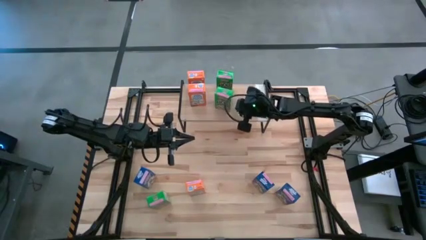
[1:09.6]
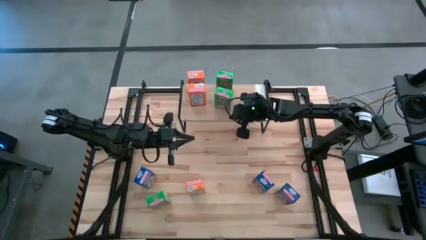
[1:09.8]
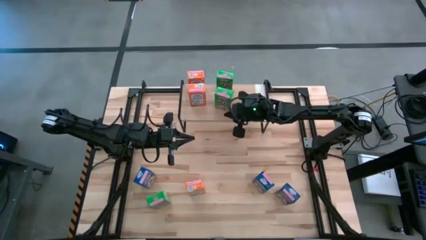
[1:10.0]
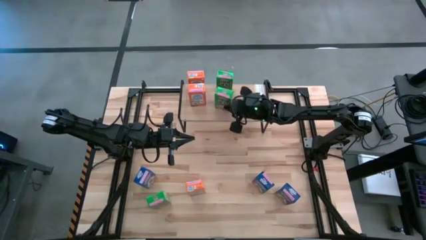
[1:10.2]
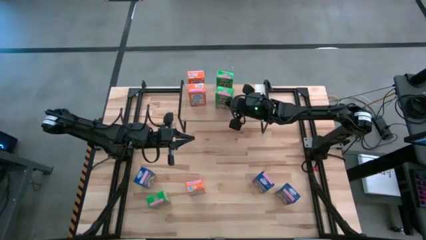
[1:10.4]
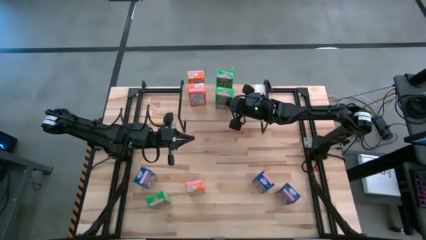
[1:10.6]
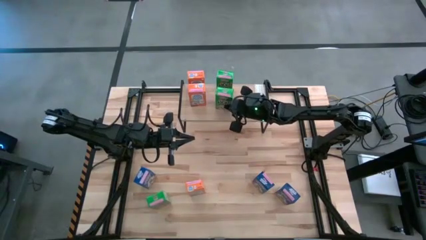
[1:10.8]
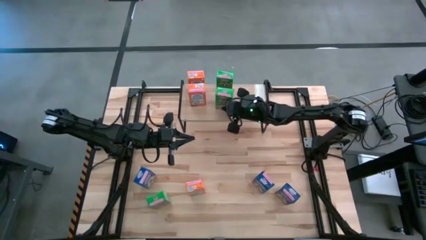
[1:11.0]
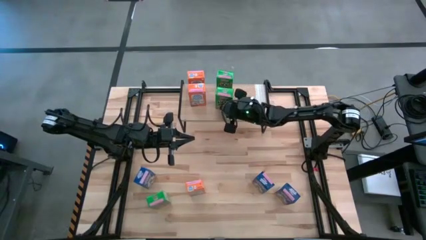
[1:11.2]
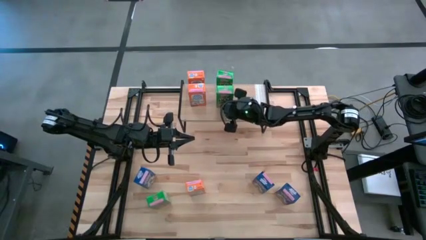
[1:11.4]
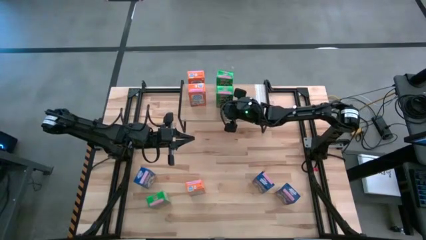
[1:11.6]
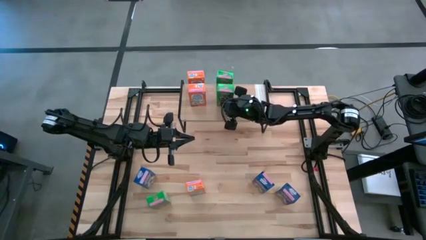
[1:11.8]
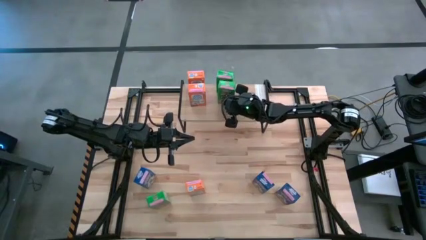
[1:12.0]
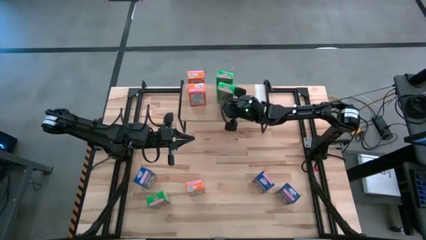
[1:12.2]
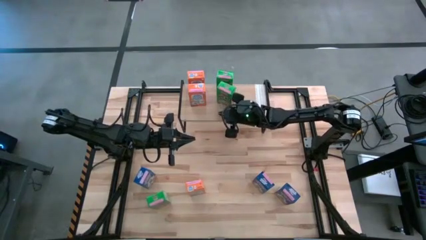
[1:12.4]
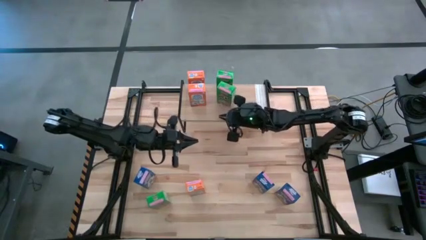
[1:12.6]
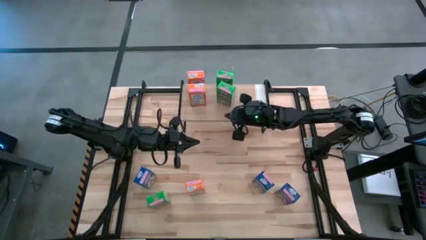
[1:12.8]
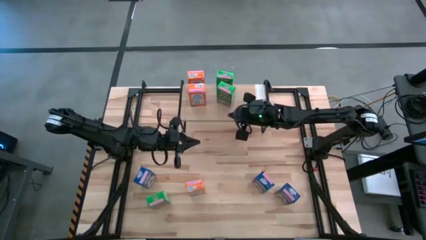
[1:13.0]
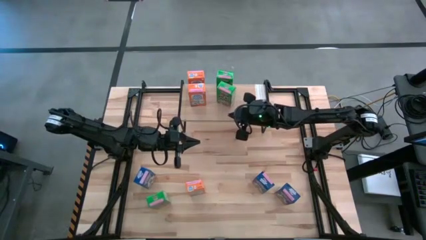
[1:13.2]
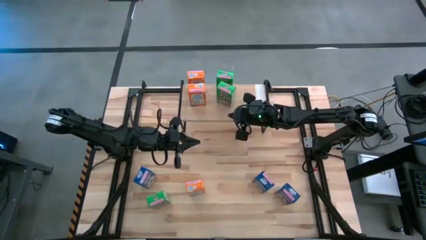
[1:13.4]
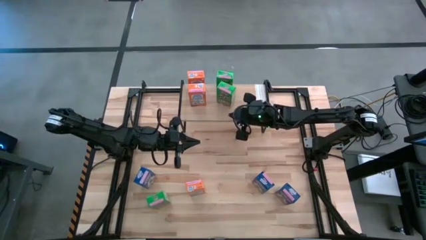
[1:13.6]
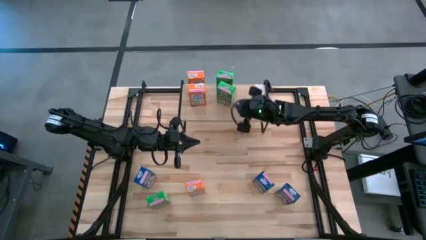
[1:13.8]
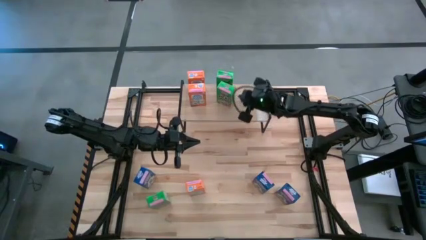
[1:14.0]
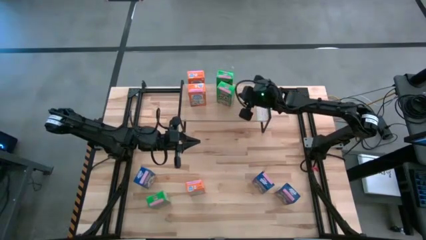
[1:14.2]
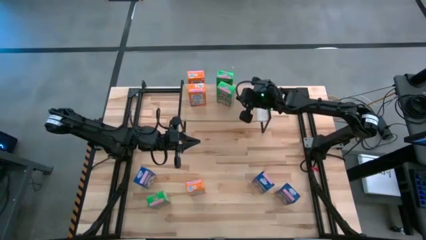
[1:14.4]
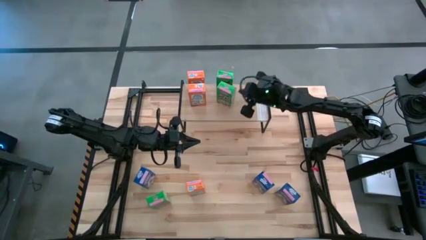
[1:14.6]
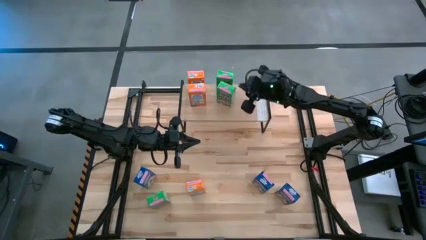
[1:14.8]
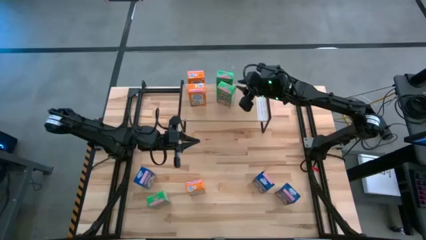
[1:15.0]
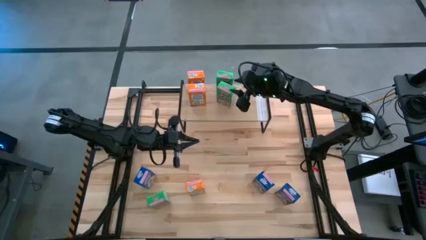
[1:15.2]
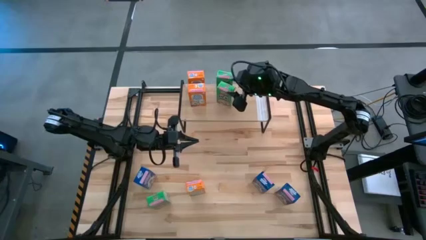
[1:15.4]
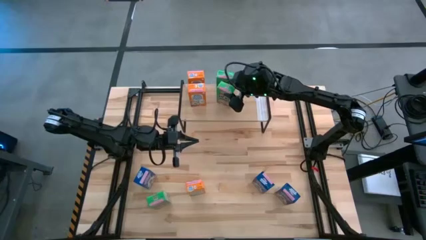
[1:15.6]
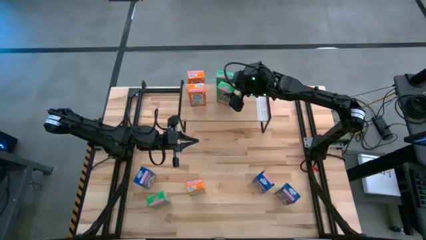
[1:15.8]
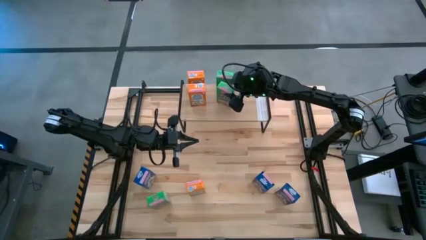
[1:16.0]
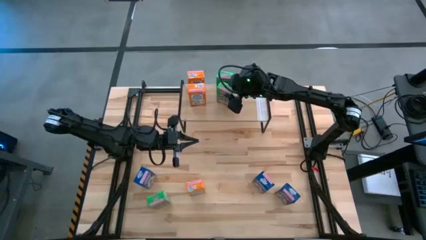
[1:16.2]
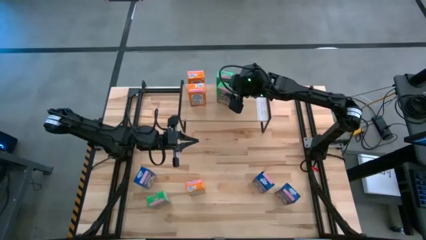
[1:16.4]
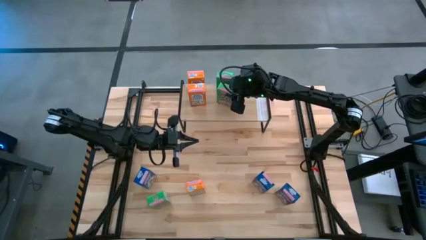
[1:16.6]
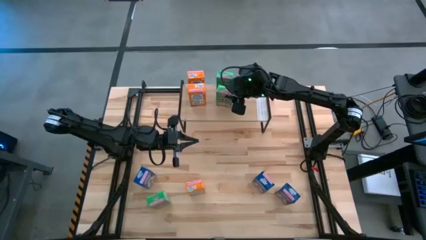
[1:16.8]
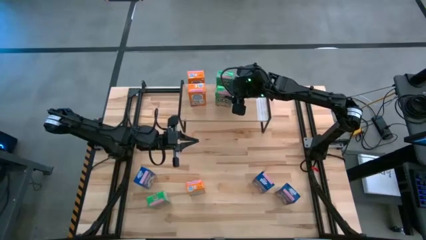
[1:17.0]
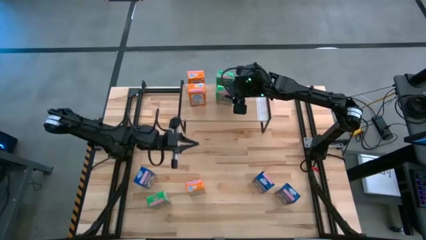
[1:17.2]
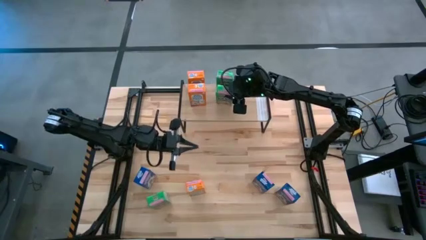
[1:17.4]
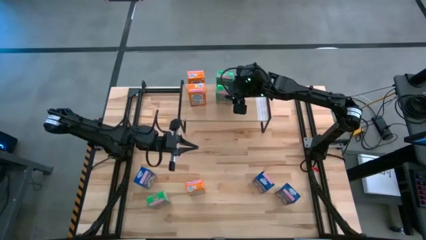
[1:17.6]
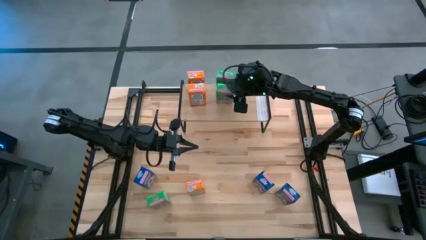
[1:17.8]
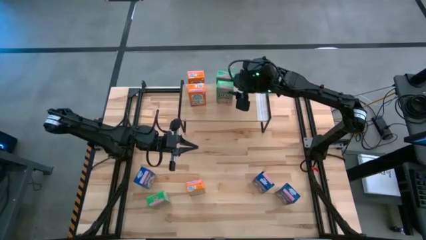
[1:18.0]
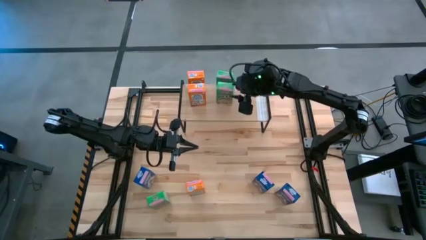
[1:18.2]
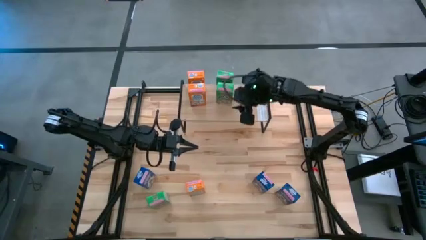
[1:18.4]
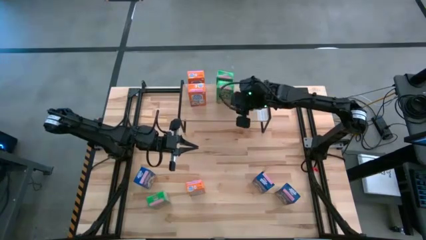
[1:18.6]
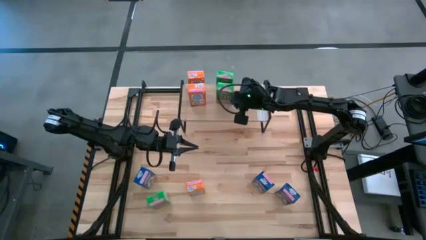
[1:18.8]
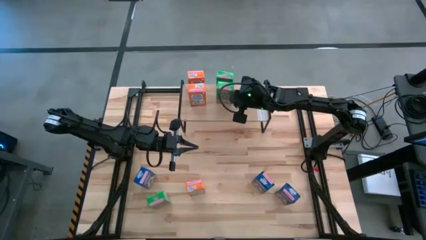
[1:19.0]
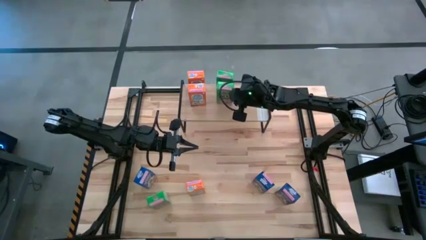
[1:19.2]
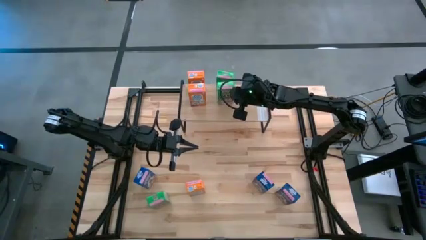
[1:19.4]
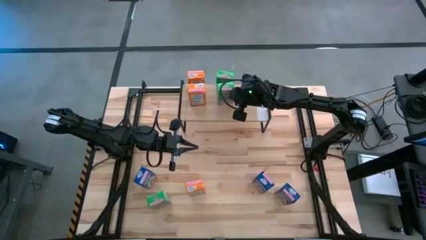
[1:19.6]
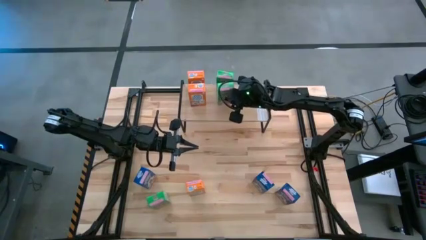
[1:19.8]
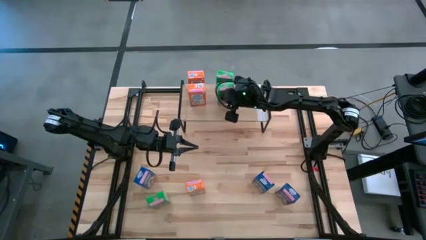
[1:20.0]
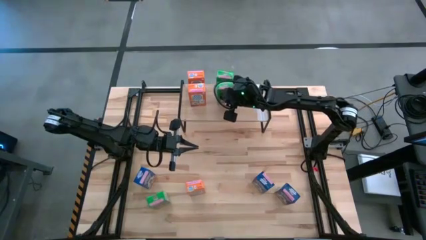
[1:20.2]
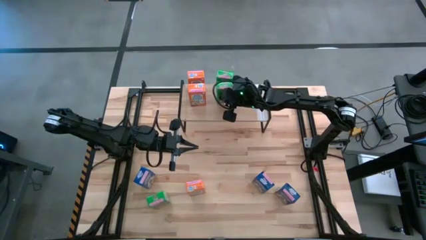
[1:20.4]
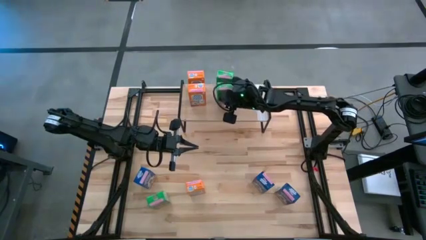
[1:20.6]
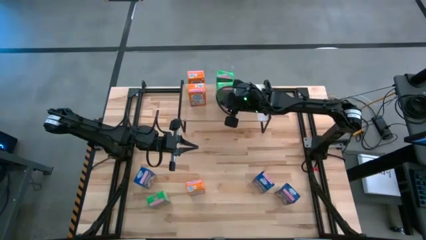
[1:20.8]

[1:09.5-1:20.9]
Task: Stack cereal on shelf
Put the right green cereal box aligned with the other green cereal box on the shelf
